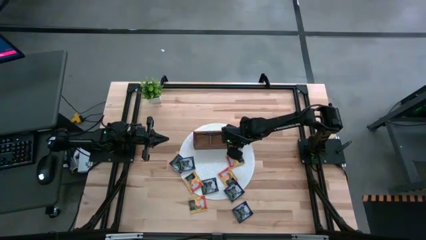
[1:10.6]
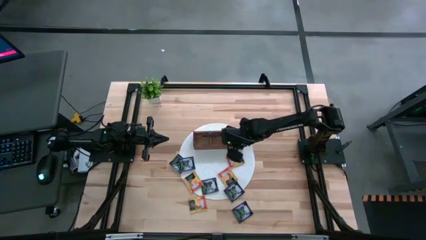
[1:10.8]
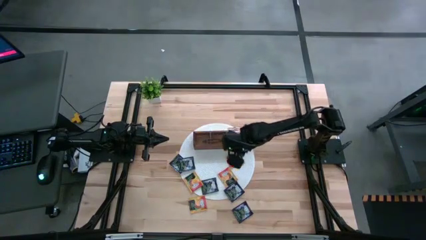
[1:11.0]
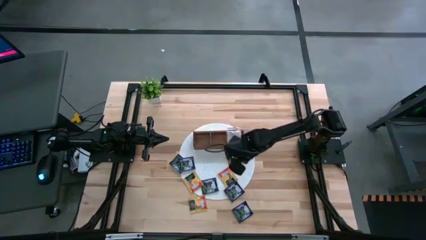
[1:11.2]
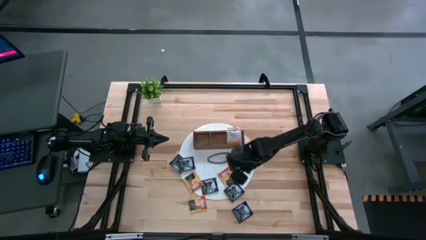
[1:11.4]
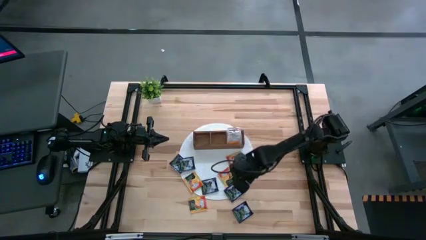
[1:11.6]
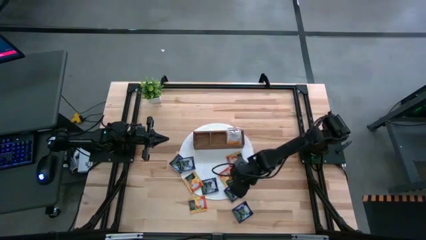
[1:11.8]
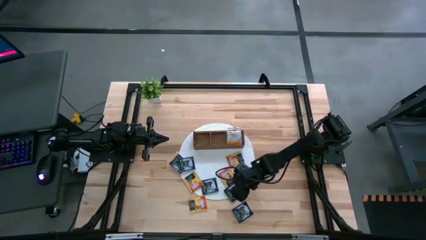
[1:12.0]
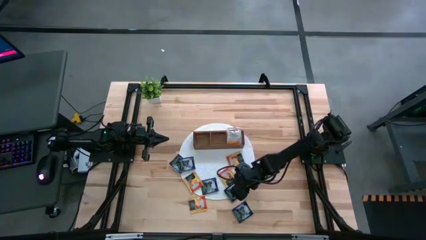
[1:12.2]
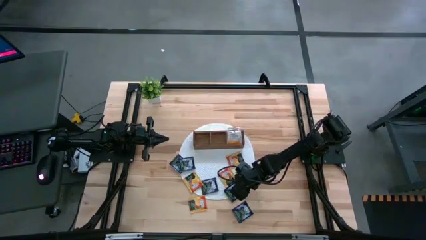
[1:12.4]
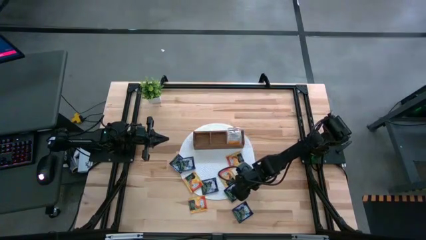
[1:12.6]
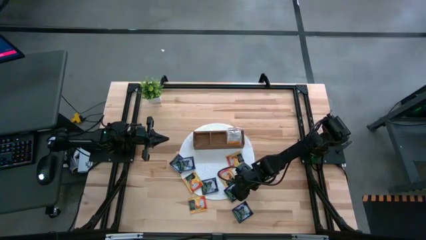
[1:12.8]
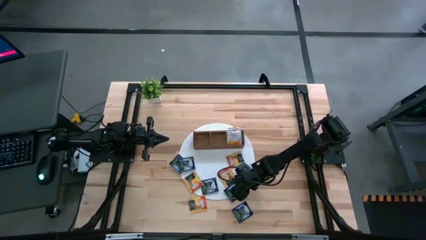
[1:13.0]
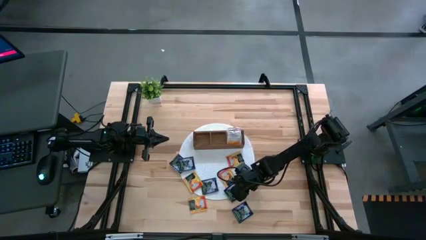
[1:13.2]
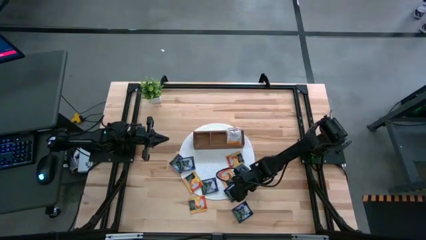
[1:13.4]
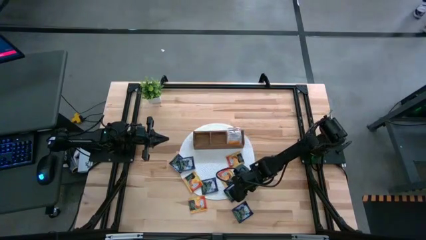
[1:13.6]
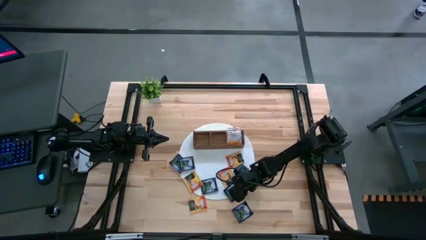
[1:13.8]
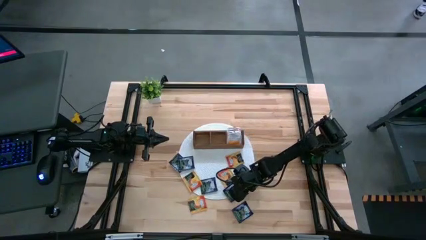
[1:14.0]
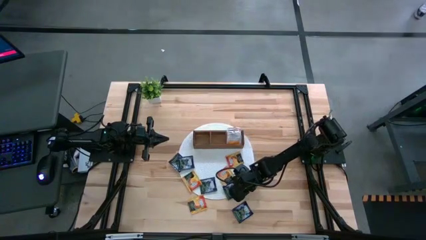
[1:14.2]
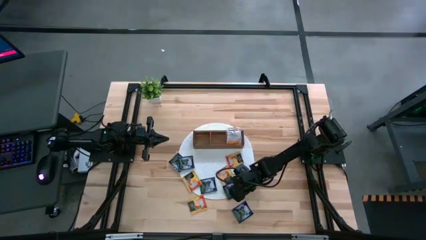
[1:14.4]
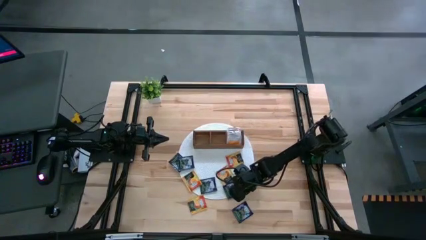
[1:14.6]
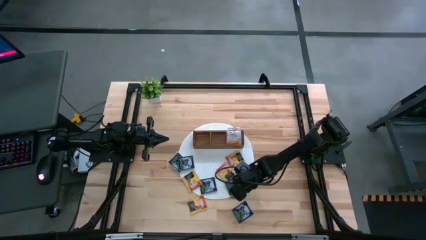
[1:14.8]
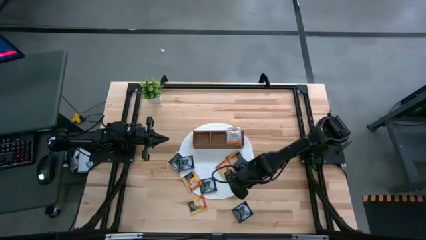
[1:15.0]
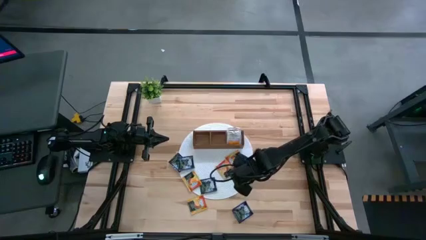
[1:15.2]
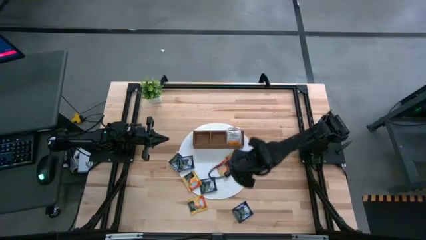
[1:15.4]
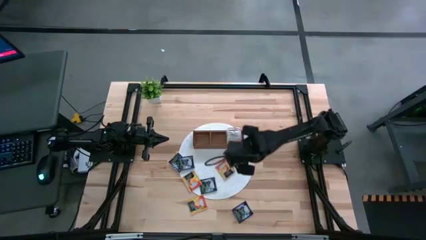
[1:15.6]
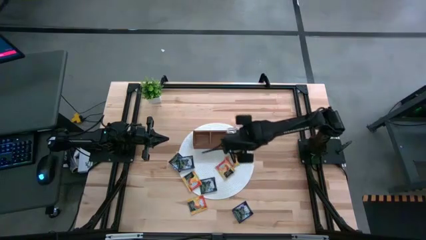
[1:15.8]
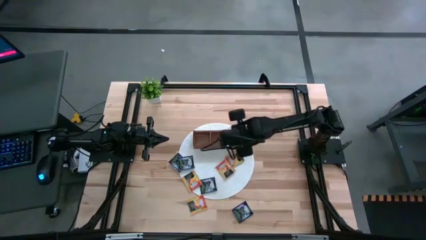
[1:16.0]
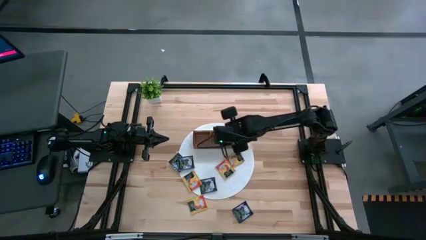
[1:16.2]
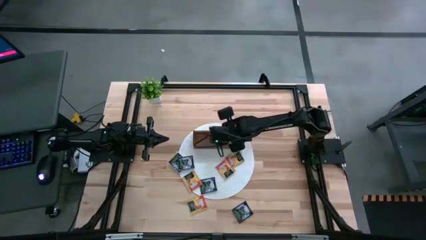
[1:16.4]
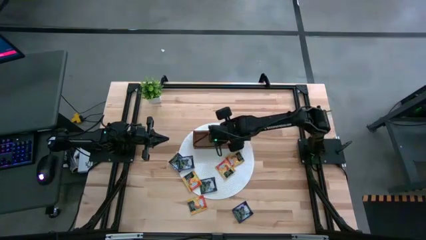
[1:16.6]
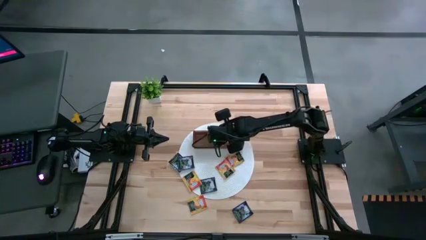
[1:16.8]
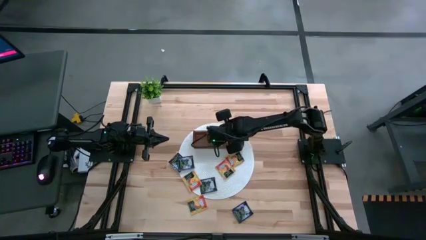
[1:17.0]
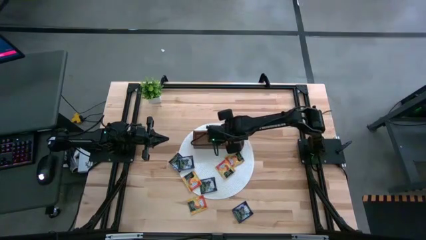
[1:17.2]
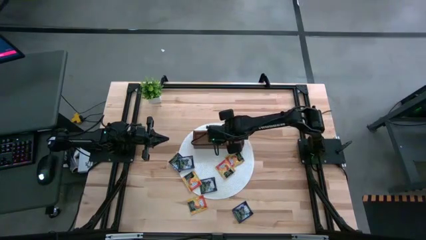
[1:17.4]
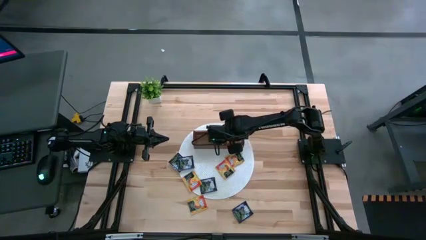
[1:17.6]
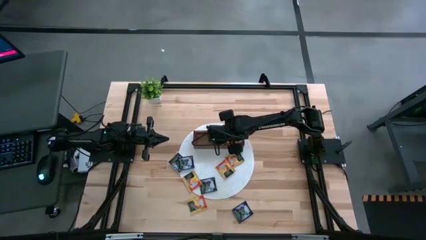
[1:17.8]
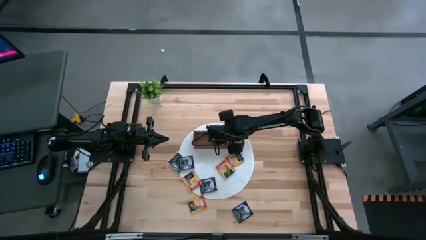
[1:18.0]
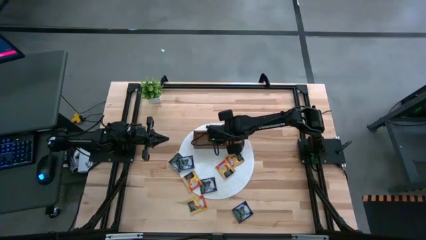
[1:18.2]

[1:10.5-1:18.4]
Task: Pick & Place Tea
Put the blue tea bag into the middle section of the wooden organizer

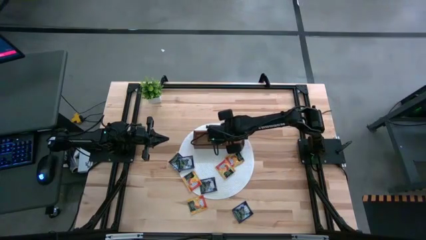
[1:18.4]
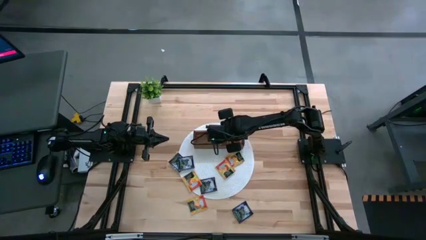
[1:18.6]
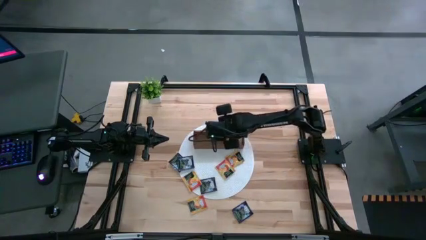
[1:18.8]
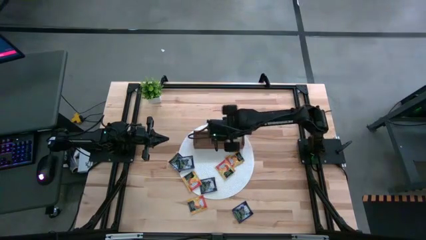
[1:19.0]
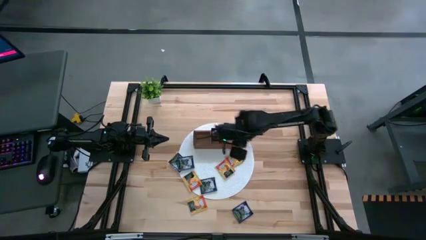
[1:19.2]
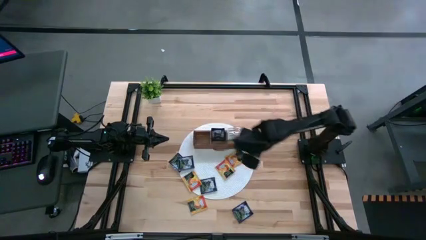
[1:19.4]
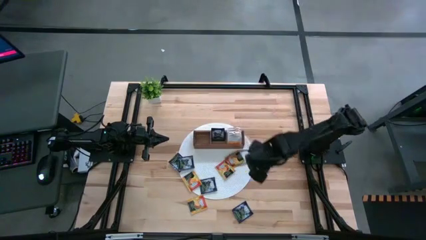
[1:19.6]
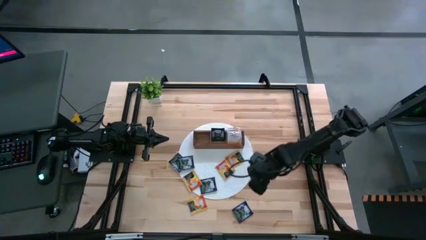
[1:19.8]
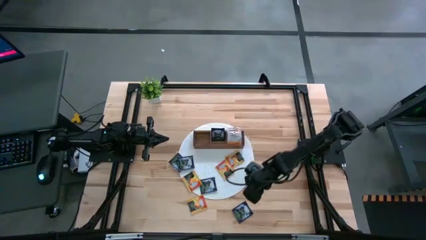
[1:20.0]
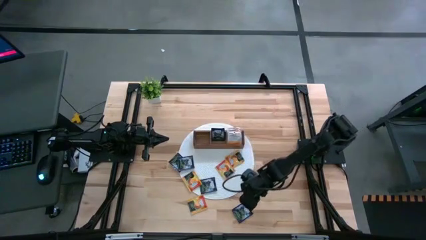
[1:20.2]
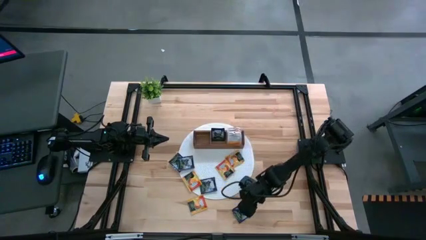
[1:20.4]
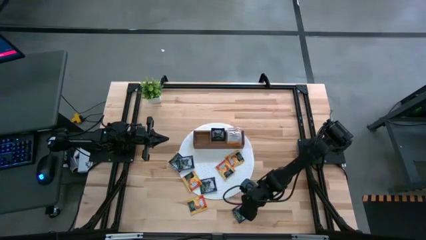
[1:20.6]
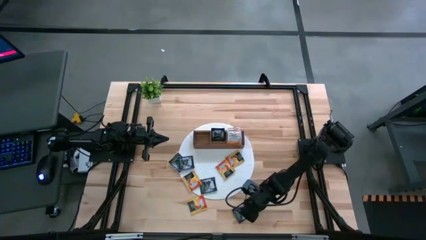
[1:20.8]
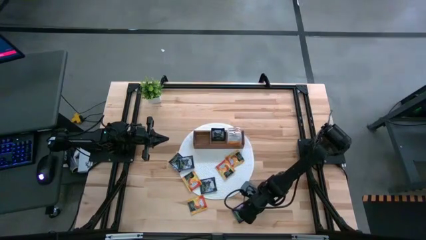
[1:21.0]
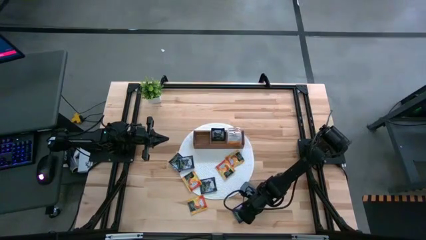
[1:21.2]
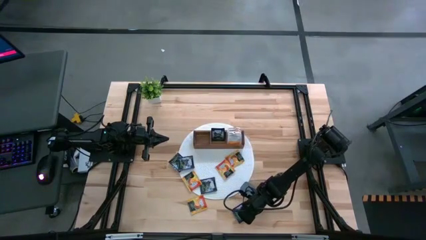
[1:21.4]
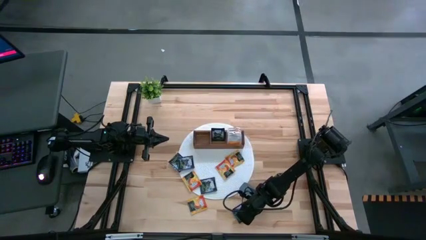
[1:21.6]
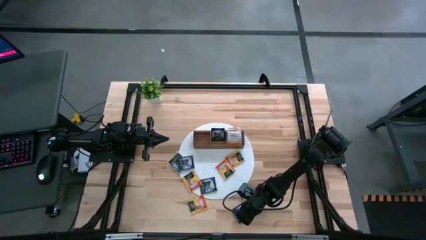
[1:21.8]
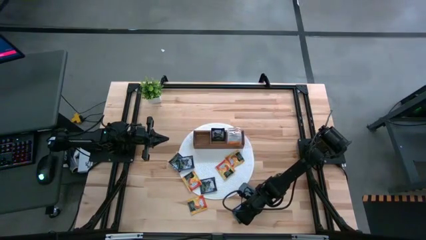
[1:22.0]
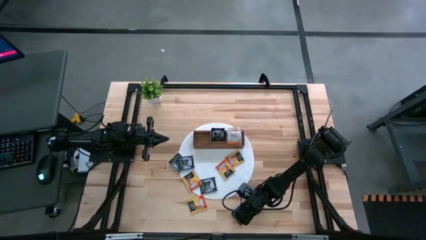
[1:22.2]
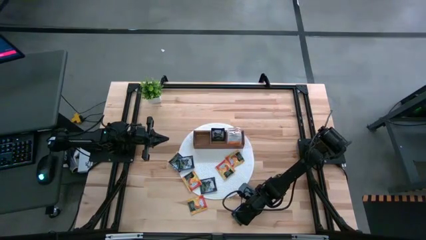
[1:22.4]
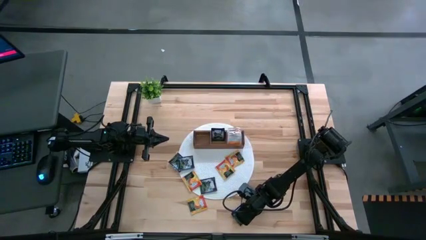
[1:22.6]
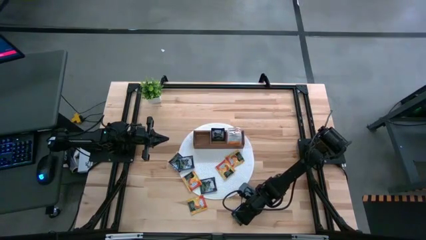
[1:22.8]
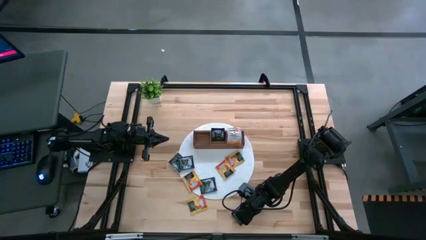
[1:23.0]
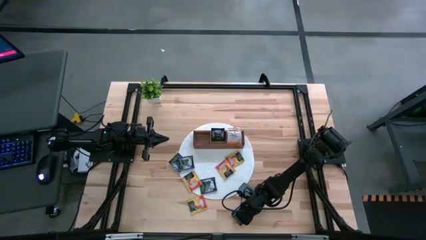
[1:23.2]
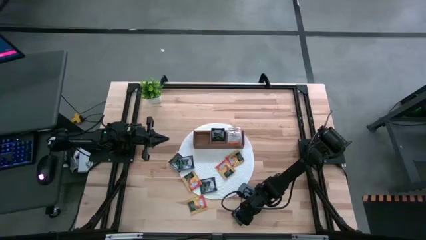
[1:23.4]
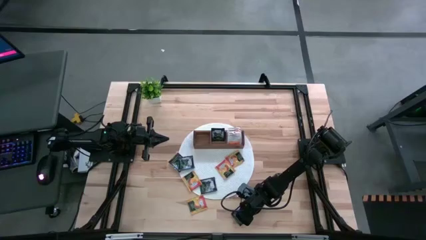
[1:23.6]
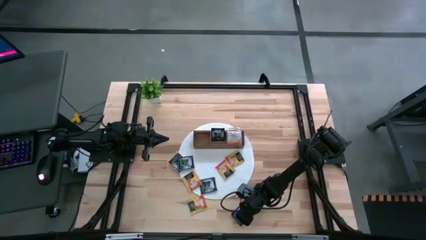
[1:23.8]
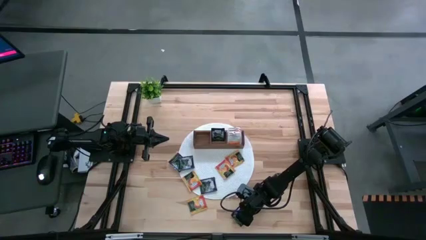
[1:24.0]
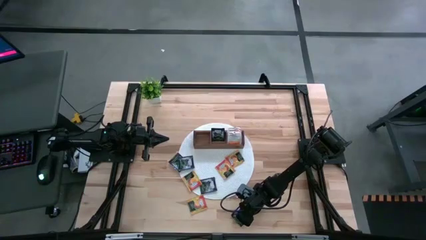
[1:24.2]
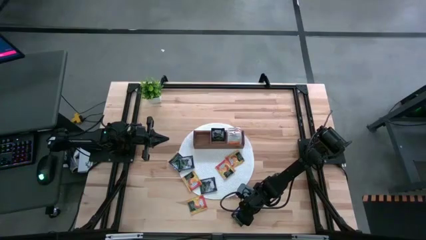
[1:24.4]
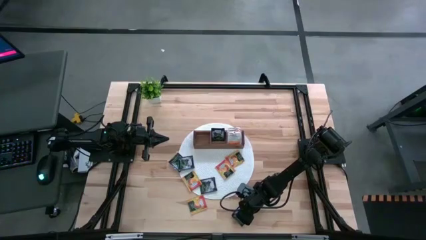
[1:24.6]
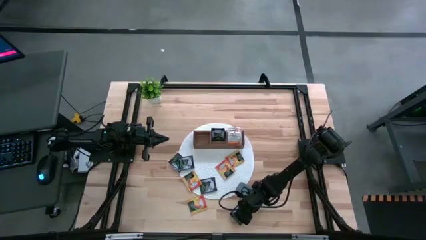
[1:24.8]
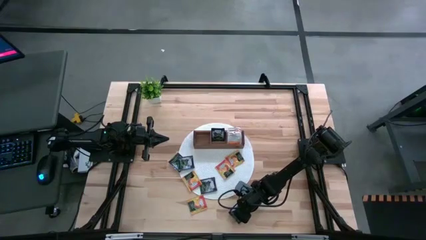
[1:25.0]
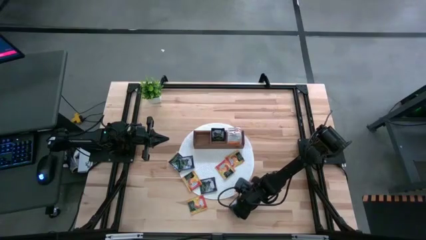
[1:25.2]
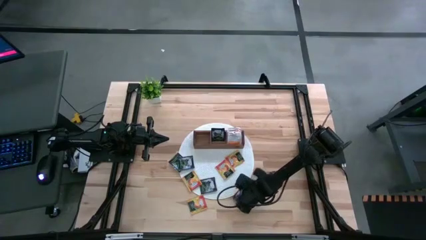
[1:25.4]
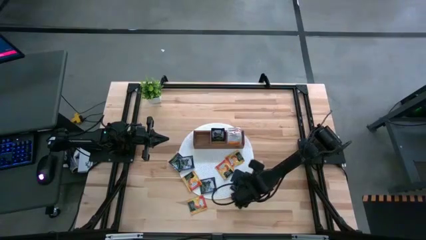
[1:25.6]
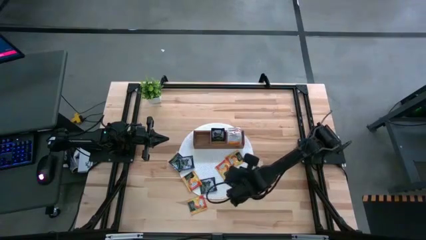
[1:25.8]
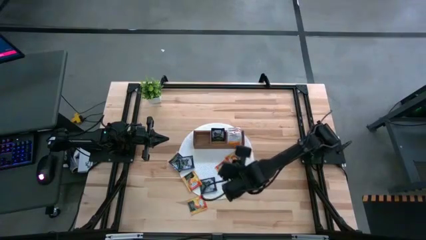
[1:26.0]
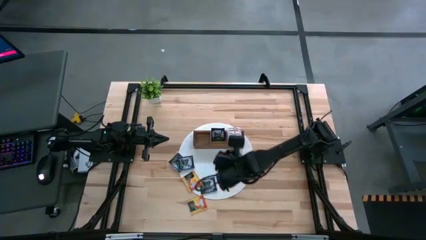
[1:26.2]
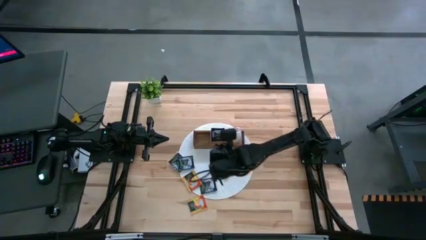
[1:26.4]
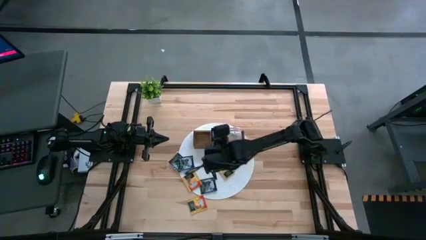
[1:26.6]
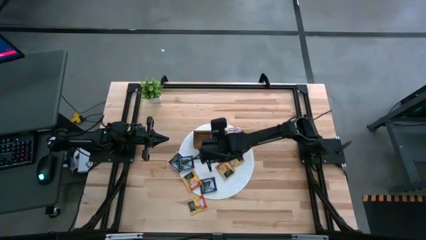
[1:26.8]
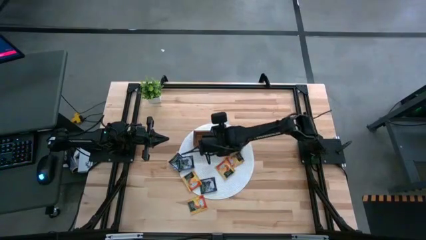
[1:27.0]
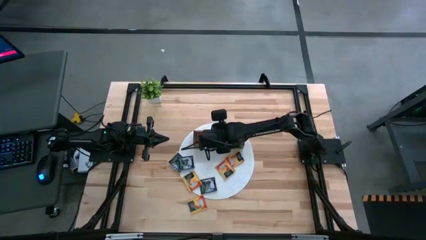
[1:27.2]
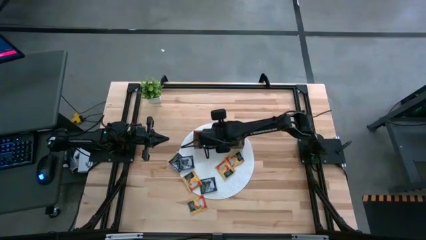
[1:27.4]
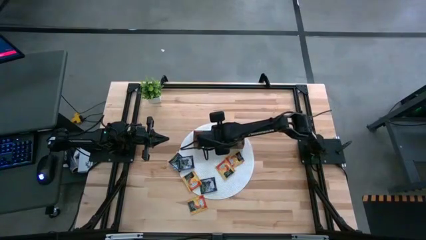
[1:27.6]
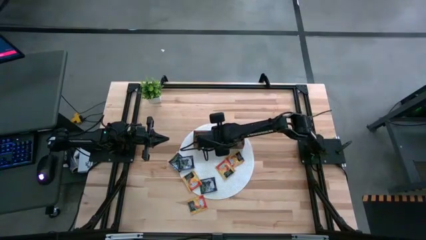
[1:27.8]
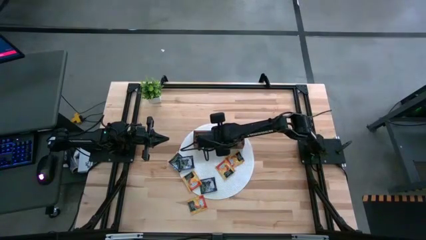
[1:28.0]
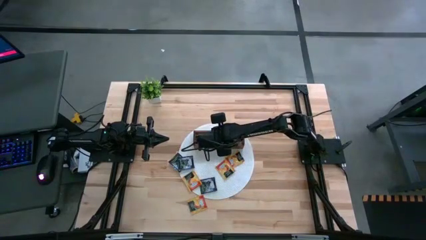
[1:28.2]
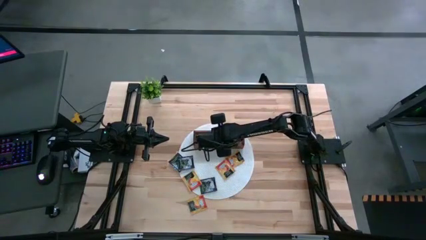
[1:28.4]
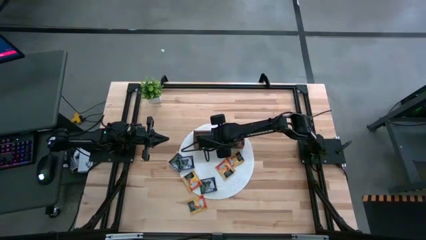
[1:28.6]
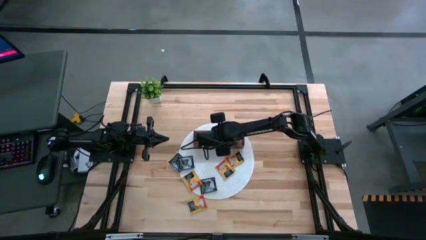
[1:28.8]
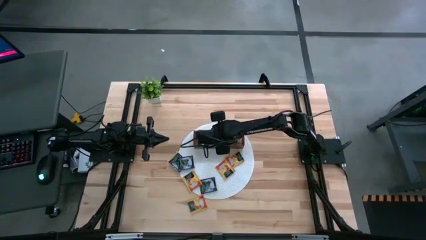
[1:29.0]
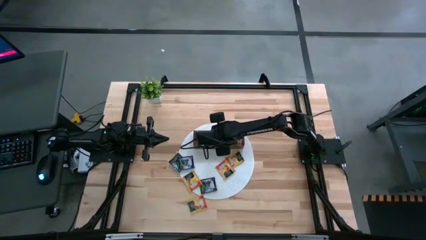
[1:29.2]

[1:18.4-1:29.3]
Put the blue tea bag into the middle section of the wooden organizer
